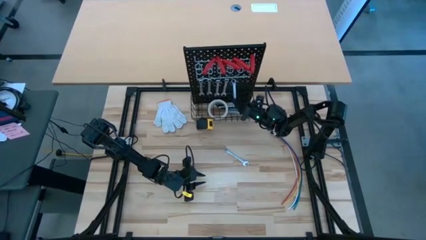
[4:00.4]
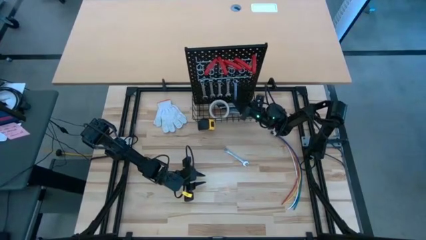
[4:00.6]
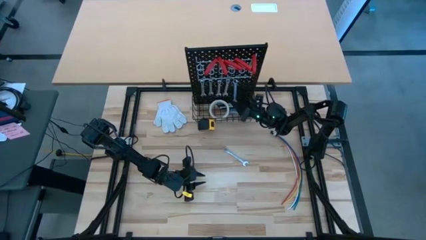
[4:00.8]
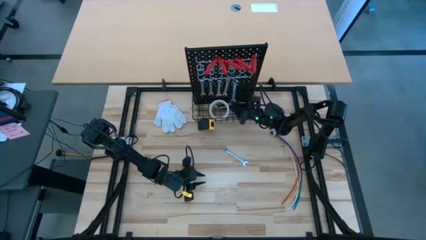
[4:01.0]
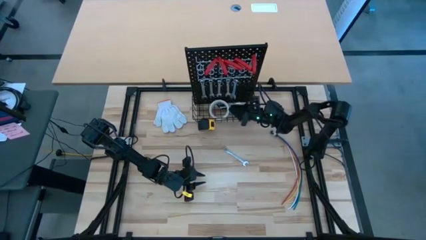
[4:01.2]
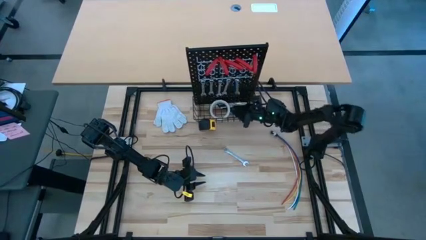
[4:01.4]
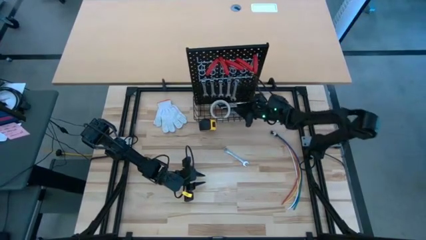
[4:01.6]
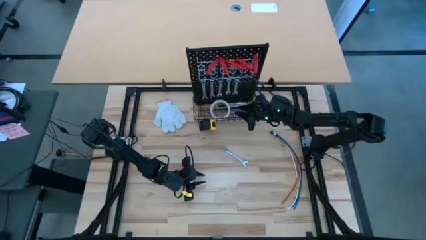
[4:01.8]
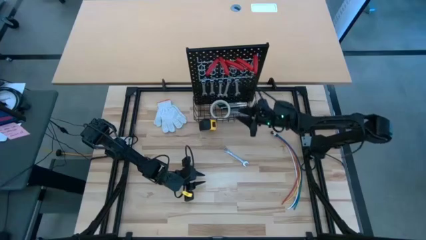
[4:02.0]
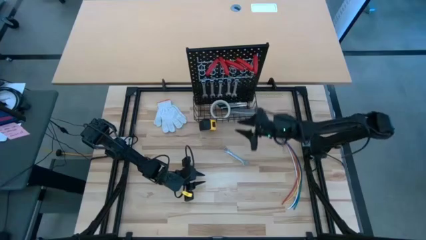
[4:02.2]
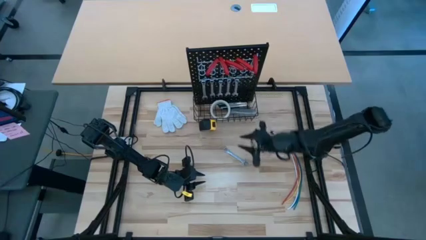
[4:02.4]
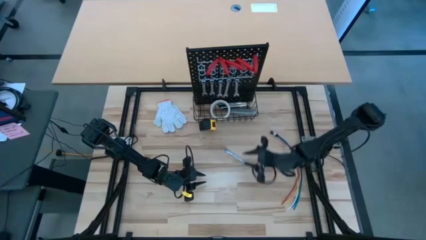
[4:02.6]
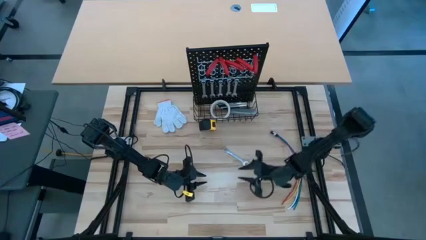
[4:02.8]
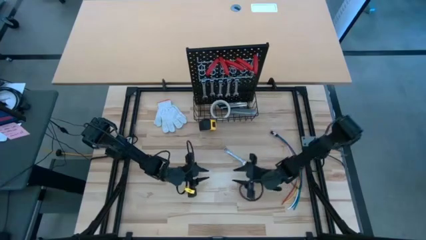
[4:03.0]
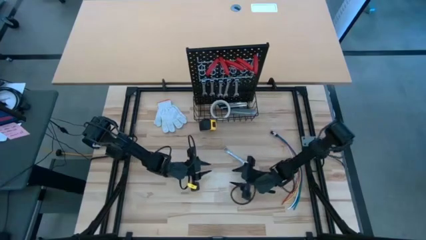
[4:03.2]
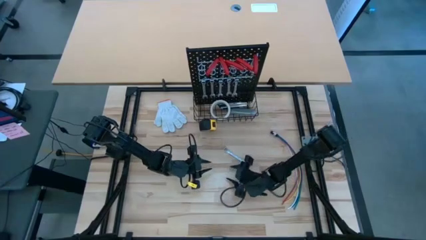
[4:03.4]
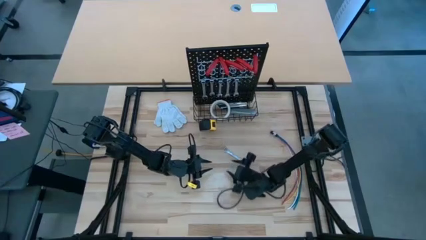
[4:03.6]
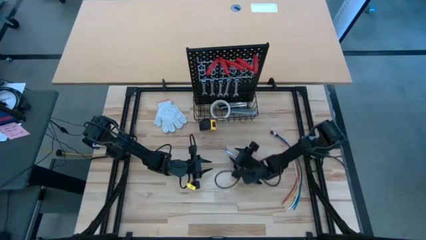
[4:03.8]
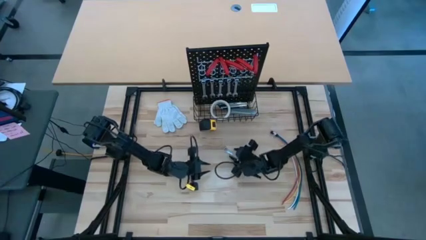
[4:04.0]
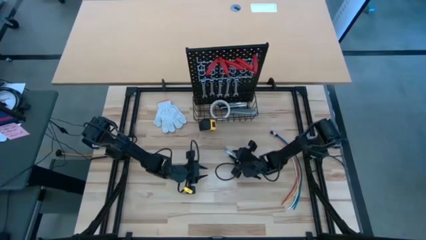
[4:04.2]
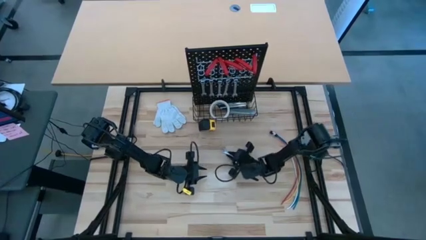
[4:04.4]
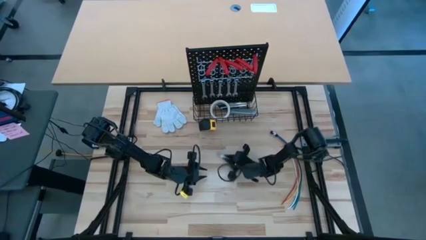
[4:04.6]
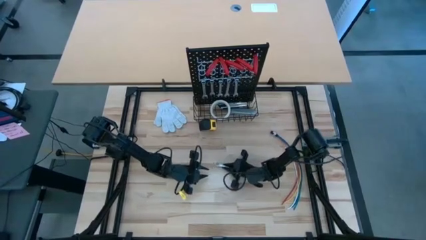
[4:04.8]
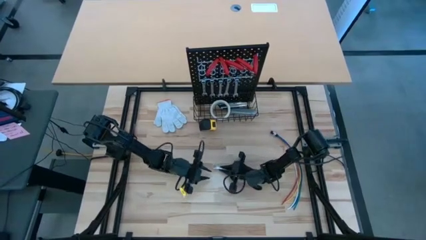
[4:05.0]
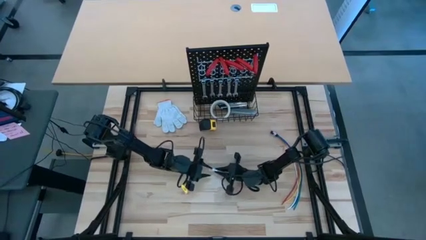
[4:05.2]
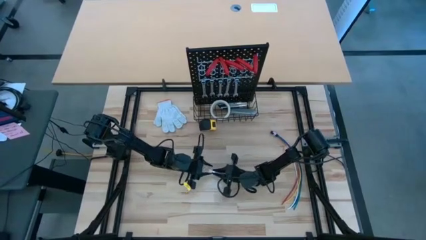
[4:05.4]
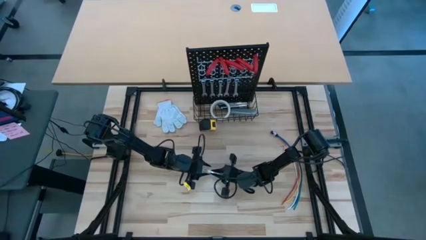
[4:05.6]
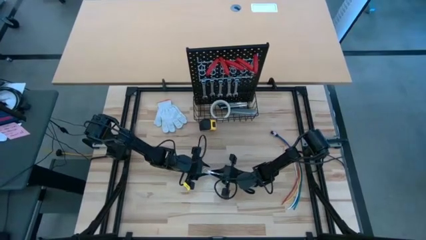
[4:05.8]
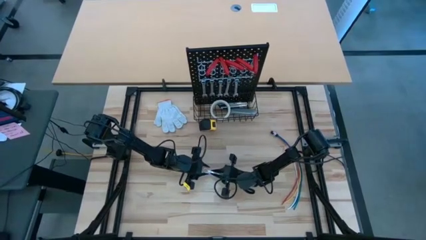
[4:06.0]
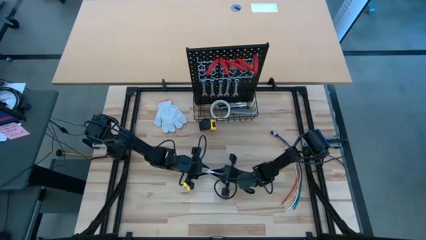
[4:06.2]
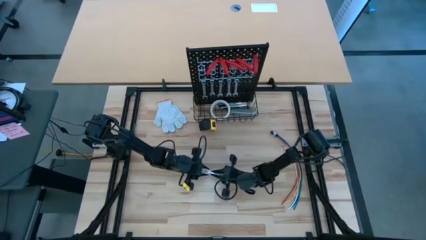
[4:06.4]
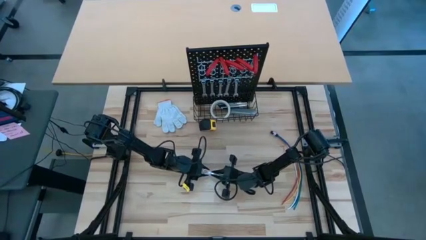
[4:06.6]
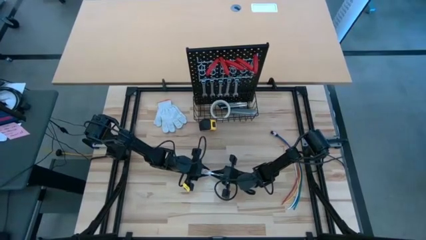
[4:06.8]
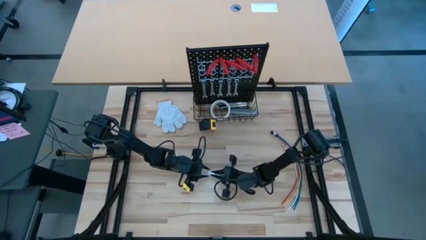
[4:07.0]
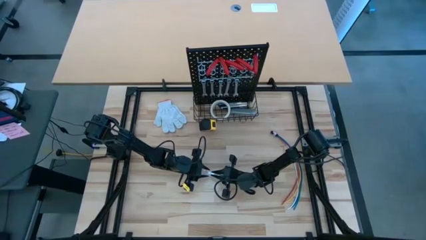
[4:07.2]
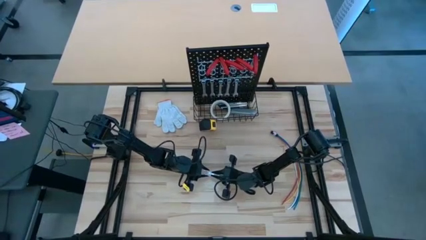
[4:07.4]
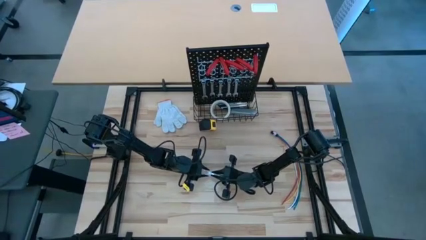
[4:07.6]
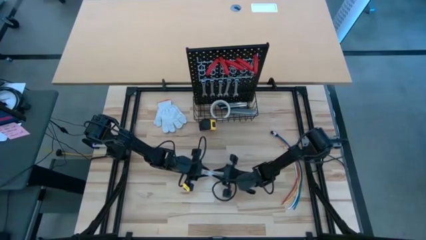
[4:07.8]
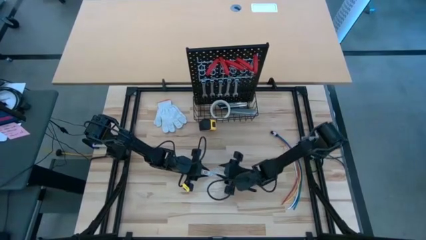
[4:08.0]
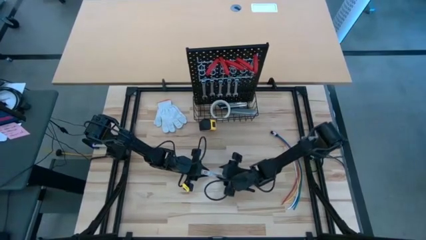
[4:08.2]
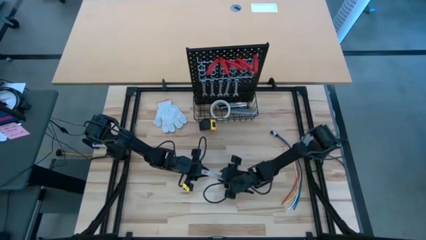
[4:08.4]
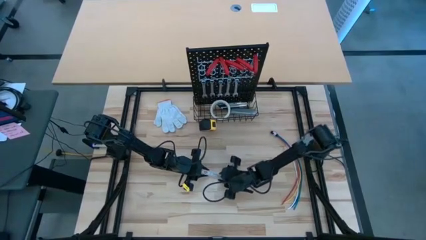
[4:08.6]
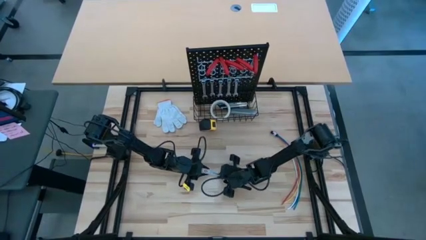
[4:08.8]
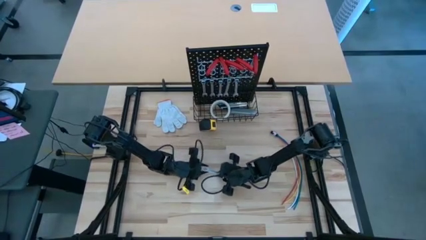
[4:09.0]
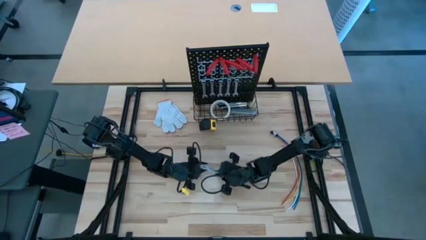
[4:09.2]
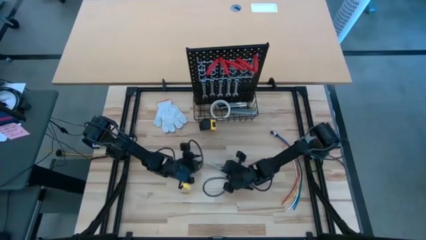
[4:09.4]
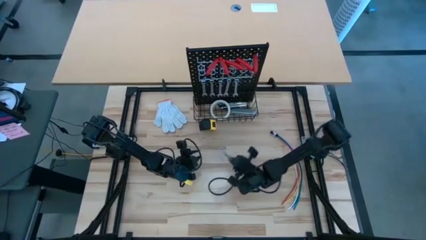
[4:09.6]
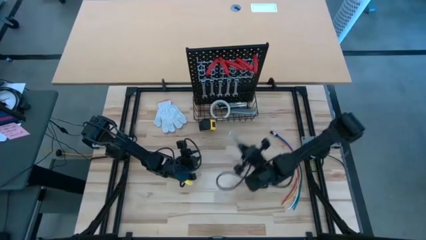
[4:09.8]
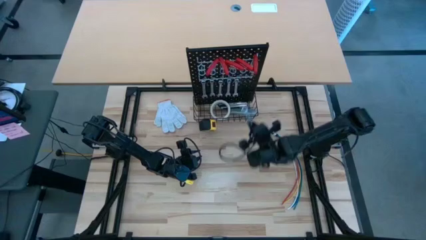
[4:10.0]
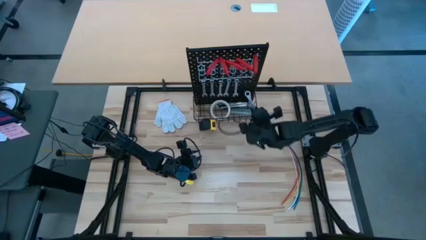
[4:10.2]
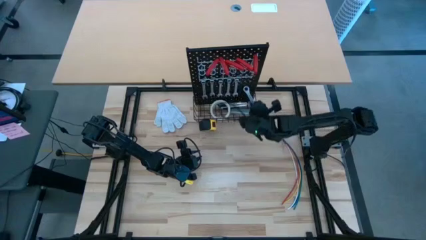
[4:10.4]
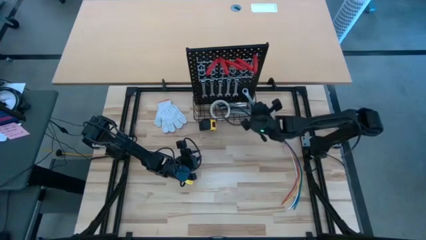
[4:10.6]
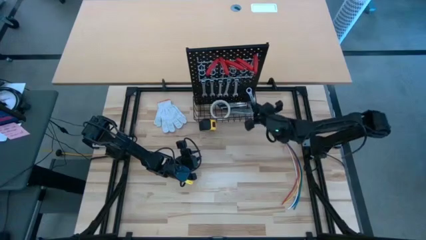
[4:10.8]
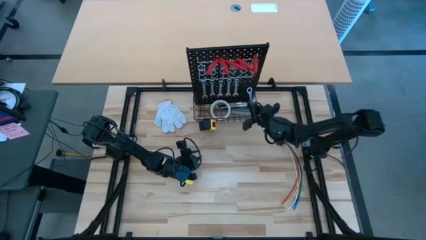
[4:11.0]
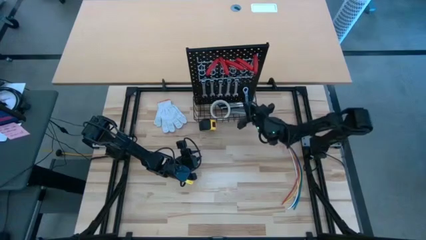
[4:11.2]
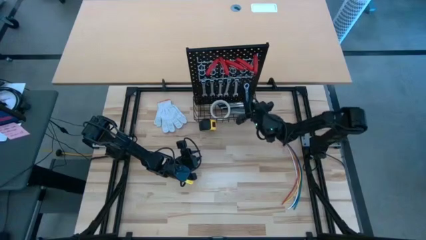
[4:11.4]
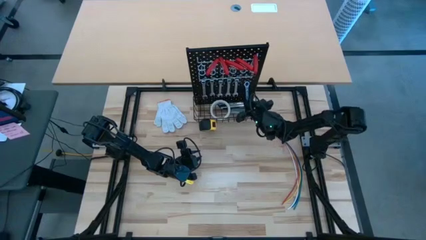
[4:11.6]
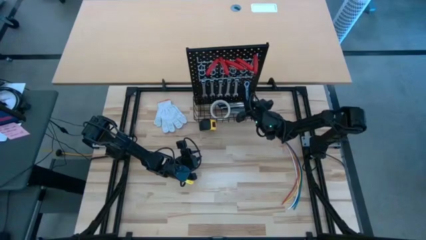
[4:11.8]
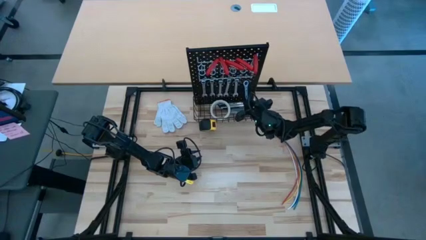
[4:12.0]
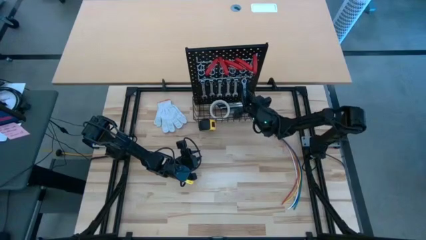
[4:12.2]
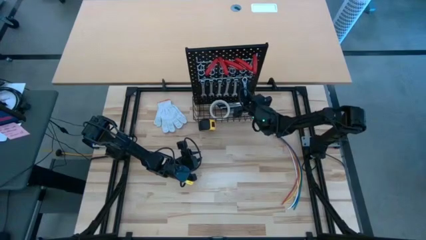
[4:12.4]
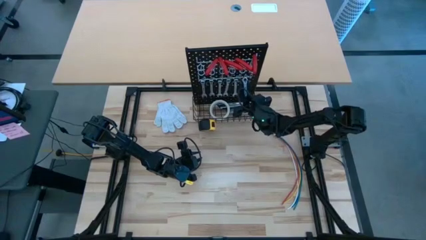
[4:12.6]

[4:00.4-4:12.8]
Task: Hang tools onto peg board
Hang the silver wrench on the pegboard

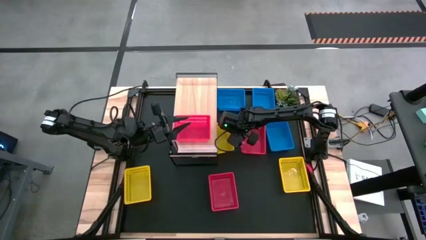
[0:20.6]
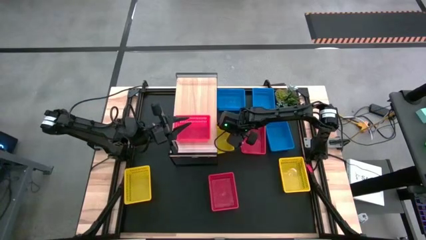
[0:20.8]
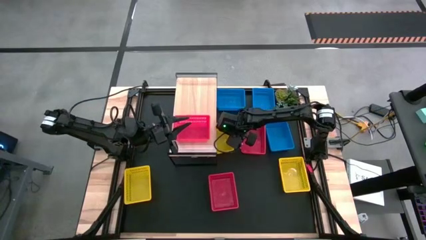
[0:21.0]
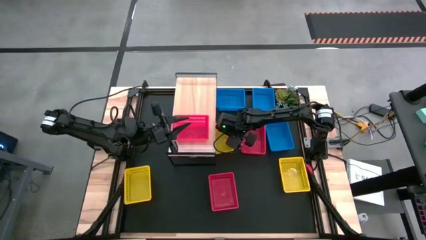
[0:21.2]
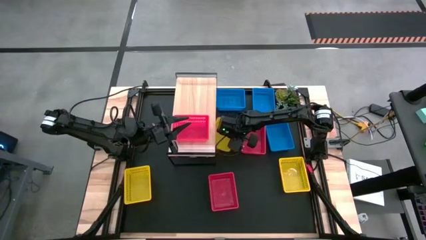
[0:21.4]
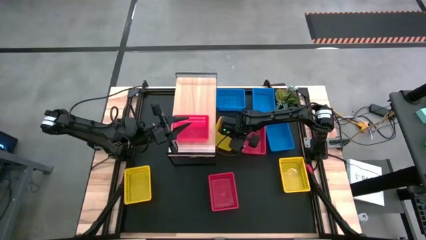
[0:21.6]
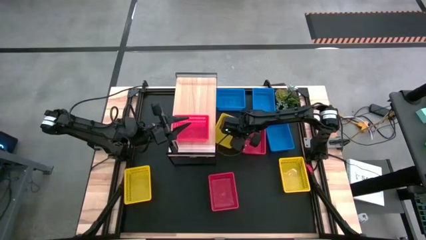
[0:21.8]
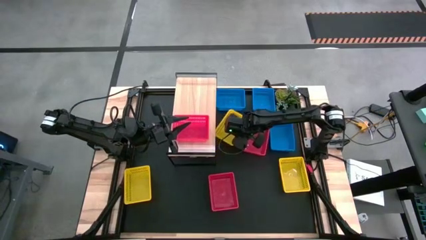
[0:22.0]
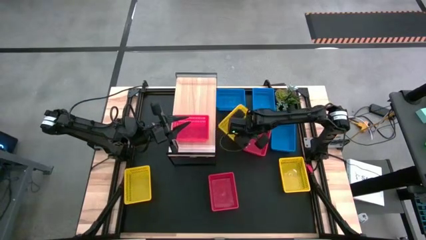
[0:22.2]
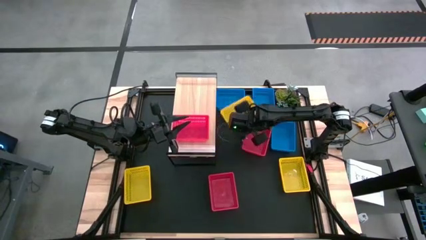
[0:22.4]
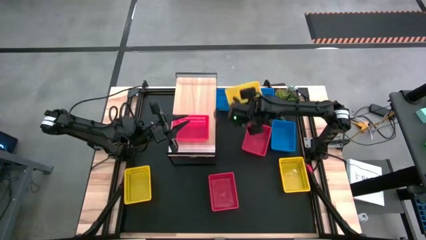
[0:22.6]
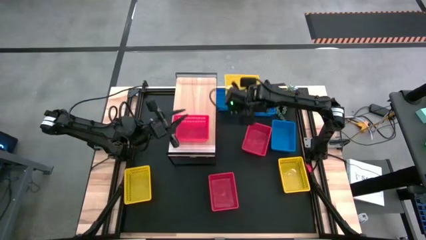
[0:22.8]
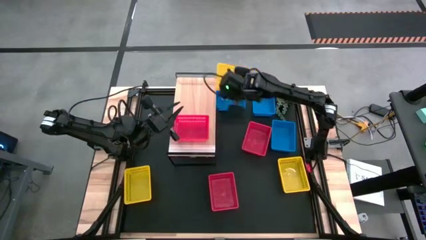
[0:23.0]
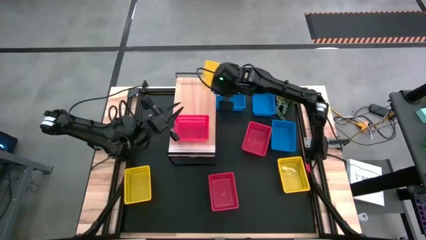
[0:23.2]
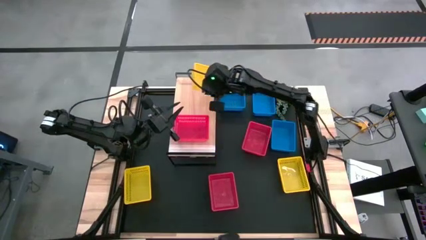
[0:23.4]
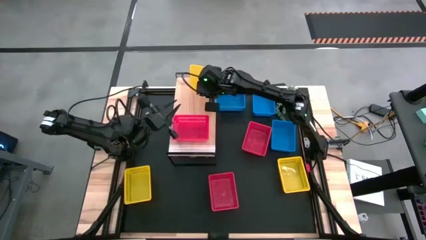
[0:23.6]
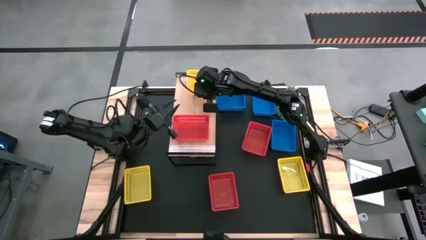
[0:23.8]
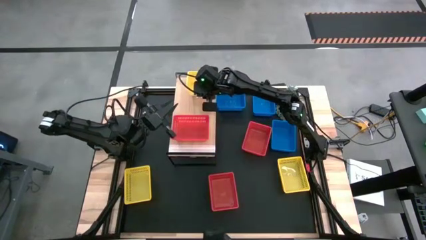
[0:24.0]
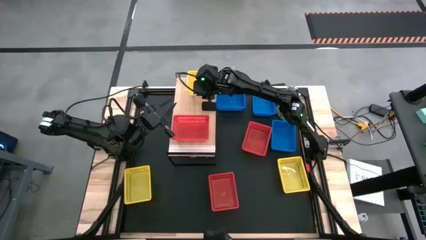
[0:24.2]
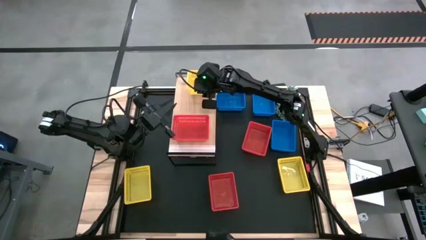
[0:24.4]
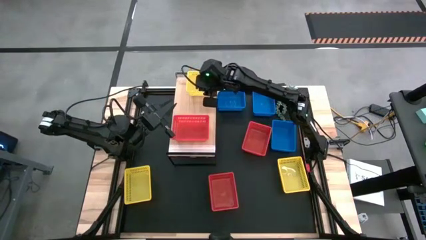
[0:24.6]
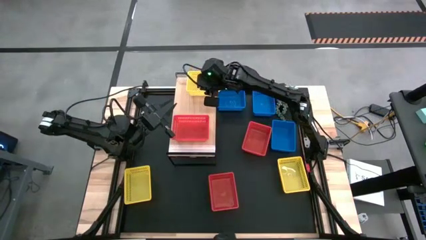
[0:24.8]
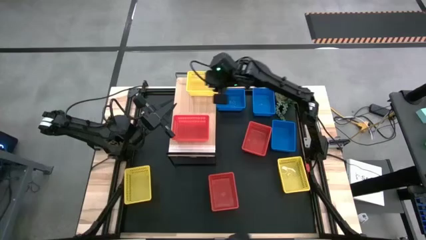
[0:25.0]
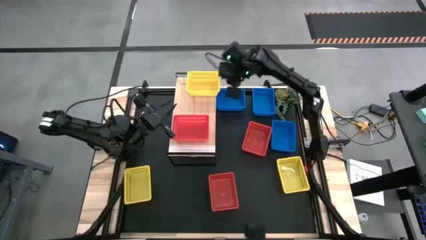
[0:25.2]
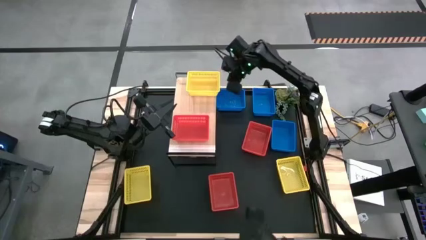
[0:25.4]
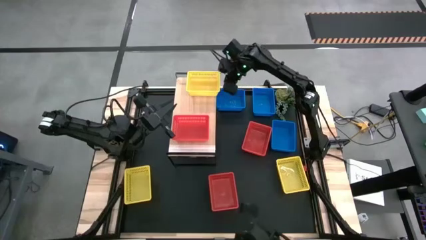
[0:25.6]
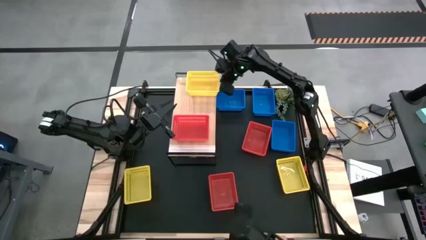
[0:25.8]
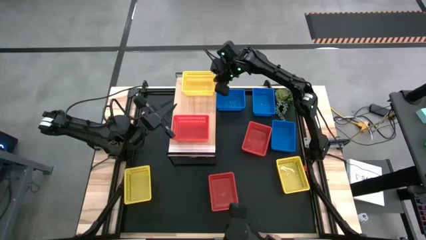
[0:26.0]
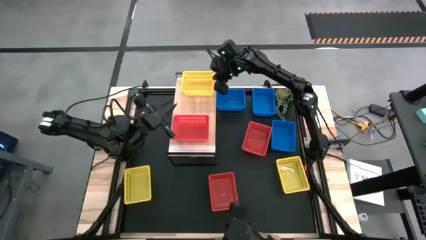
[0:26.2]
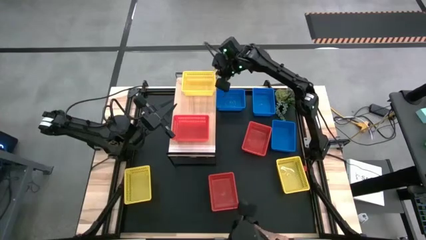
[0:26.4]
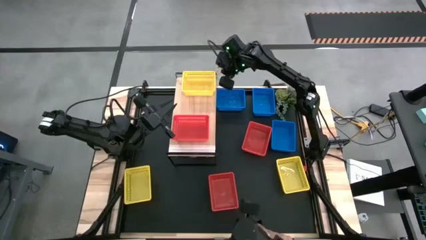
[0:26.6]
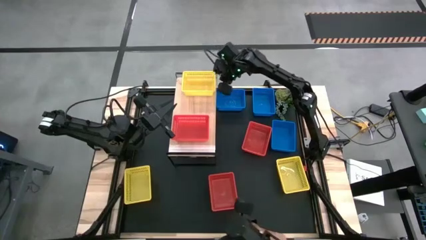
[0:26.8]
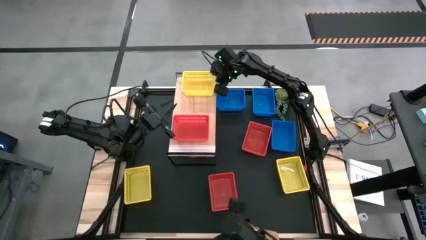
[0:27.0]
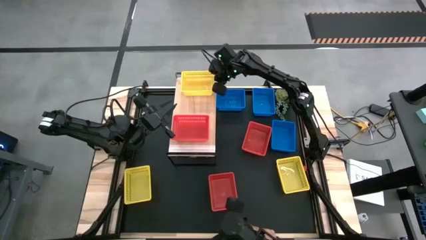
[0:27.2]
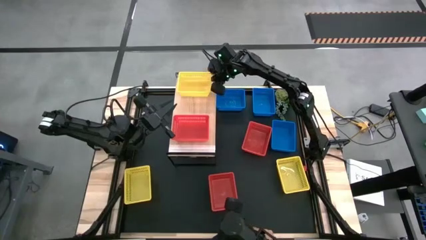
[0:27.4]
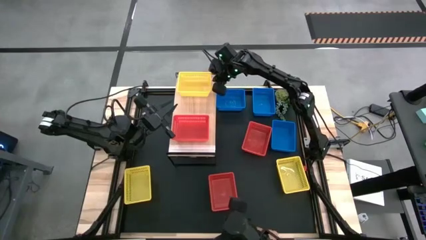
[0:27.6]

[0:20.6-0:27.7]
Task: Stack baskets on shelf by color
Put the middle yellow bin on the shelf
